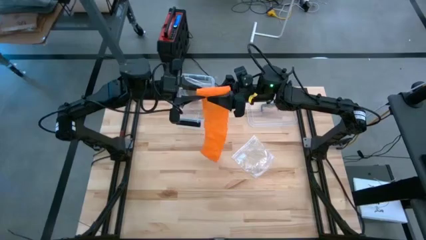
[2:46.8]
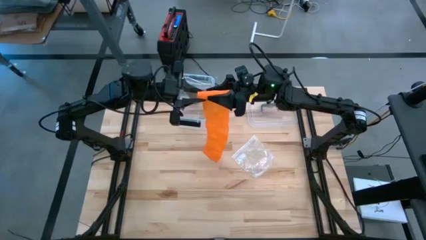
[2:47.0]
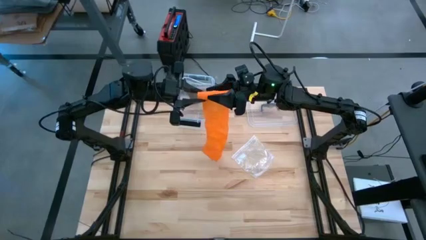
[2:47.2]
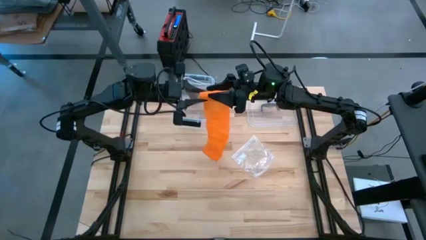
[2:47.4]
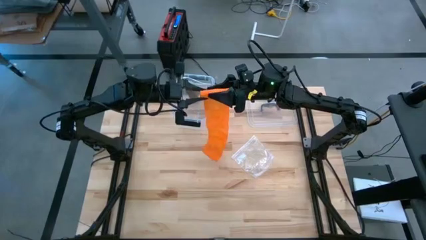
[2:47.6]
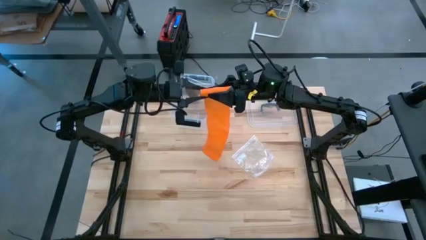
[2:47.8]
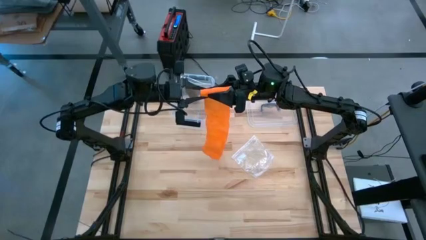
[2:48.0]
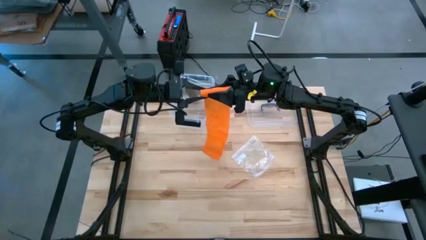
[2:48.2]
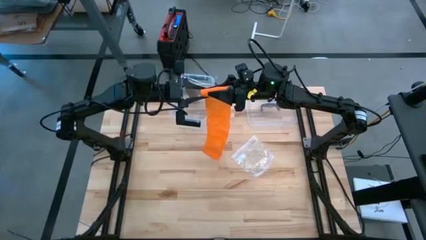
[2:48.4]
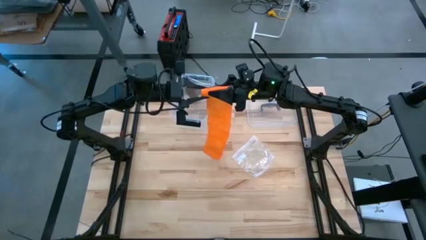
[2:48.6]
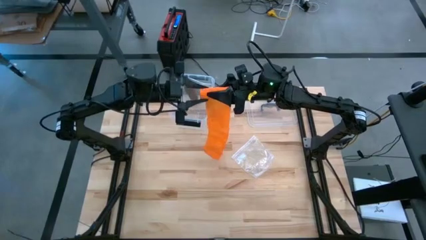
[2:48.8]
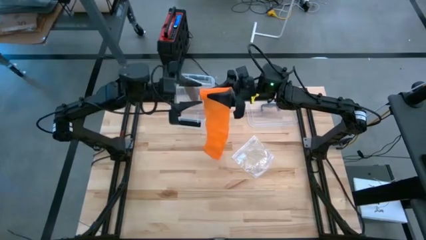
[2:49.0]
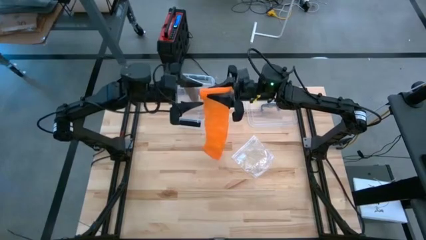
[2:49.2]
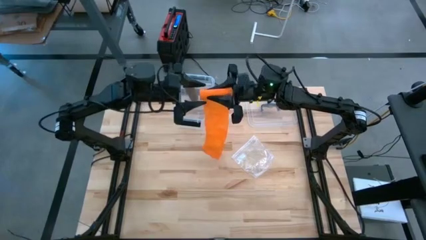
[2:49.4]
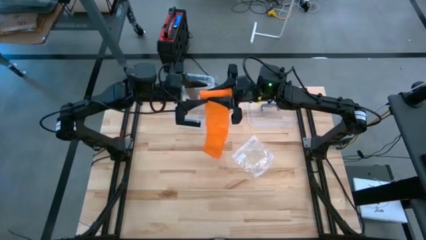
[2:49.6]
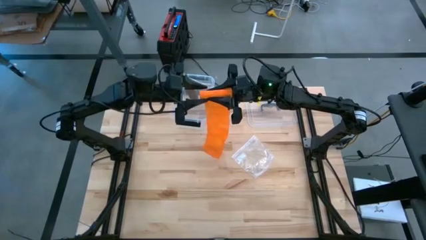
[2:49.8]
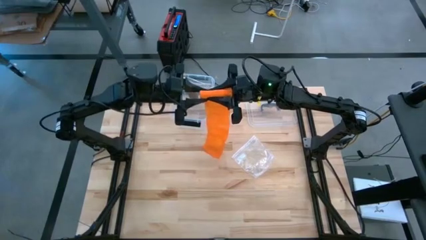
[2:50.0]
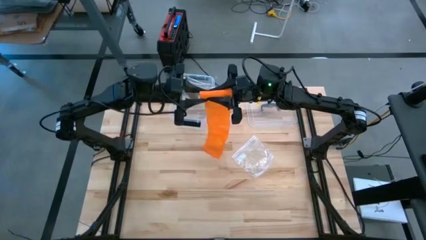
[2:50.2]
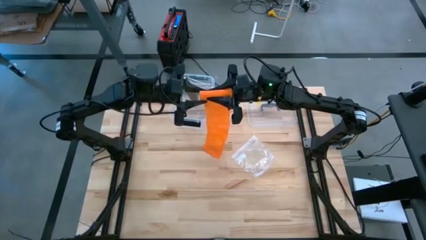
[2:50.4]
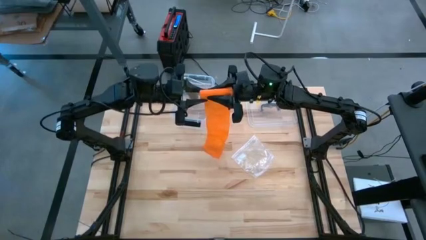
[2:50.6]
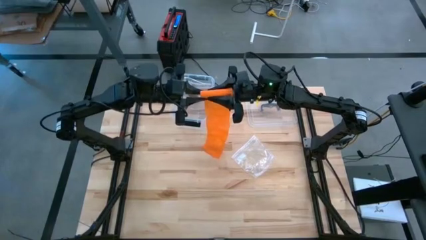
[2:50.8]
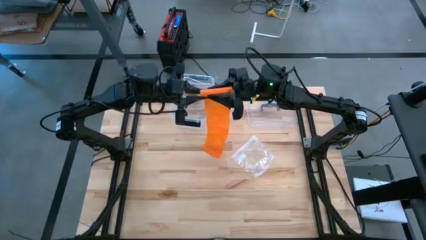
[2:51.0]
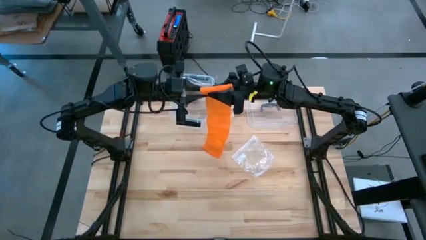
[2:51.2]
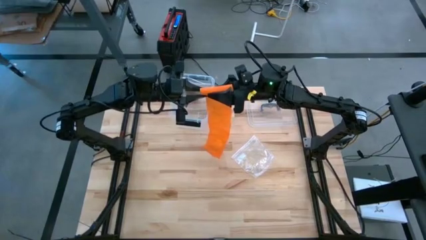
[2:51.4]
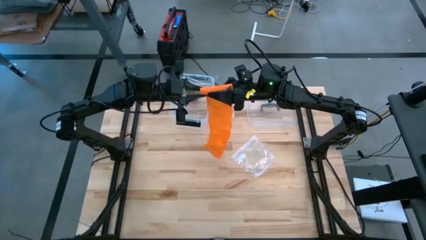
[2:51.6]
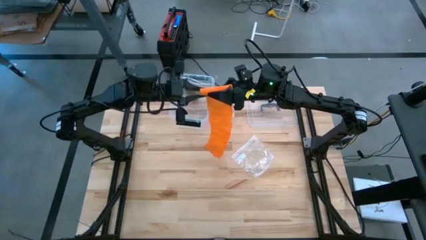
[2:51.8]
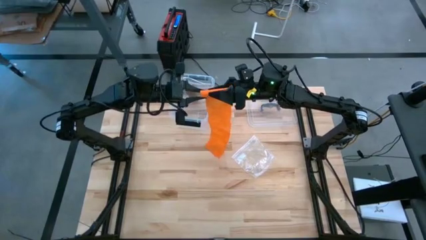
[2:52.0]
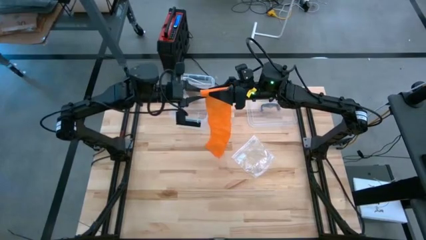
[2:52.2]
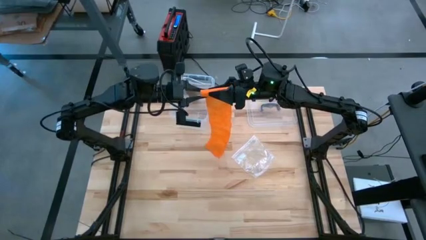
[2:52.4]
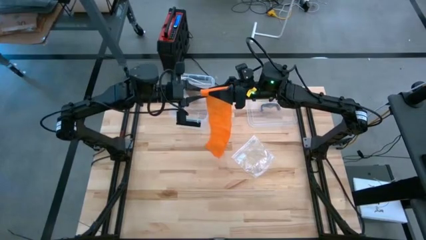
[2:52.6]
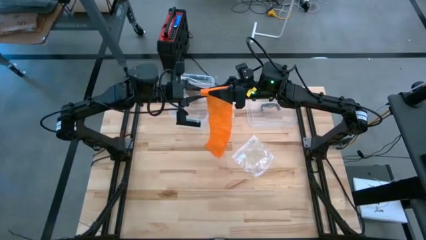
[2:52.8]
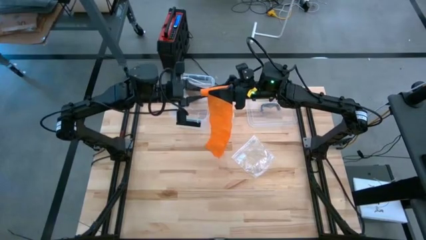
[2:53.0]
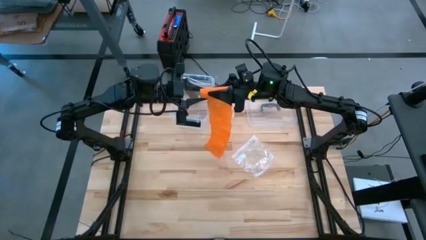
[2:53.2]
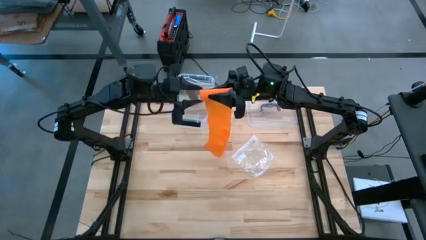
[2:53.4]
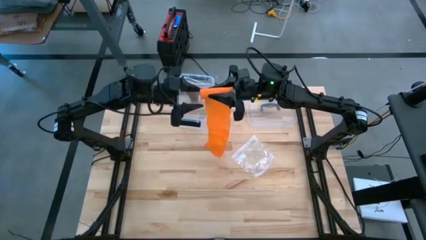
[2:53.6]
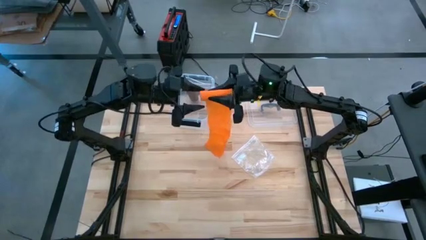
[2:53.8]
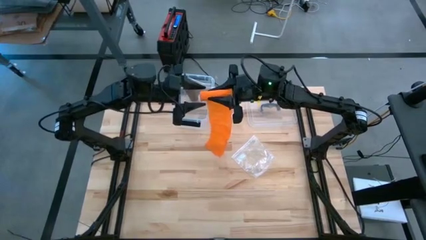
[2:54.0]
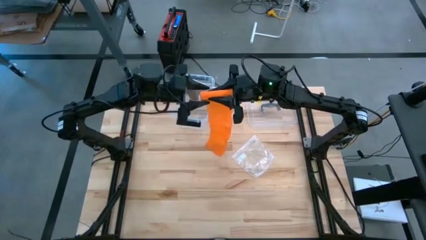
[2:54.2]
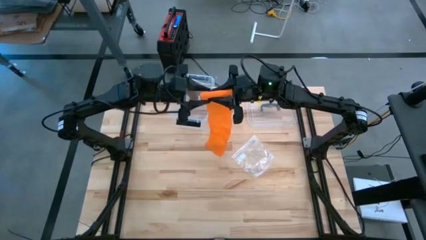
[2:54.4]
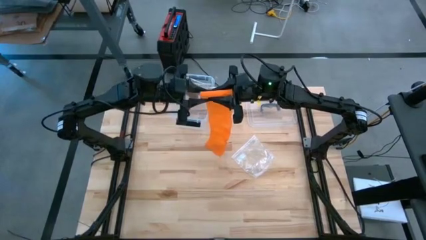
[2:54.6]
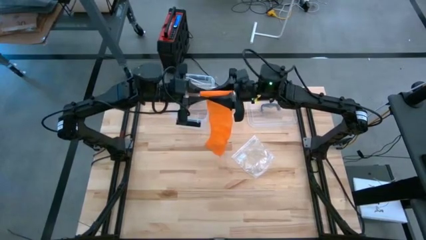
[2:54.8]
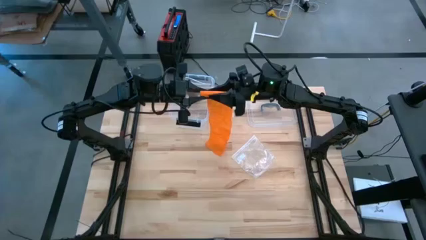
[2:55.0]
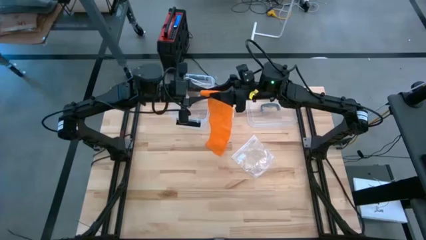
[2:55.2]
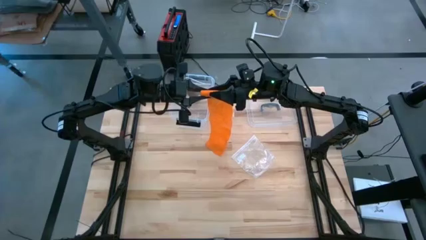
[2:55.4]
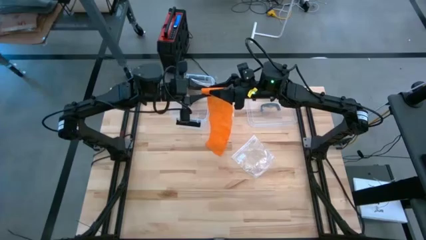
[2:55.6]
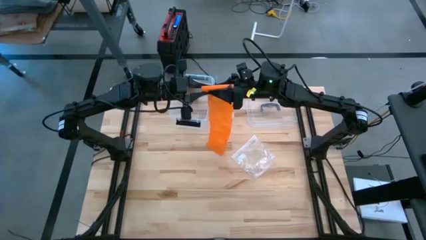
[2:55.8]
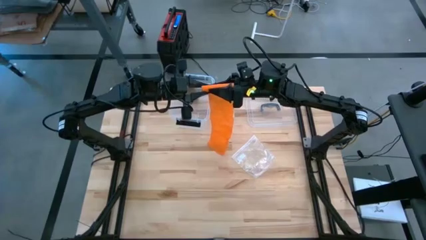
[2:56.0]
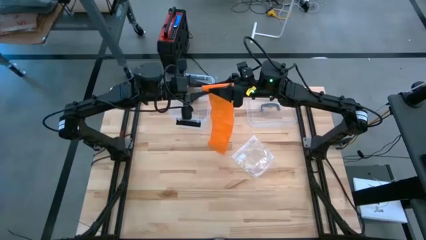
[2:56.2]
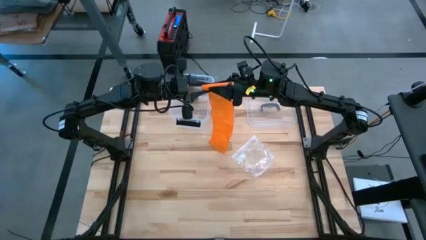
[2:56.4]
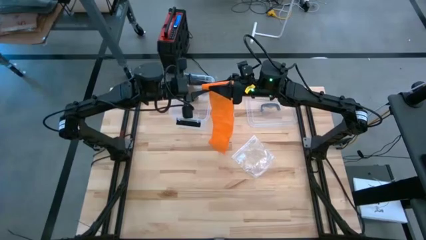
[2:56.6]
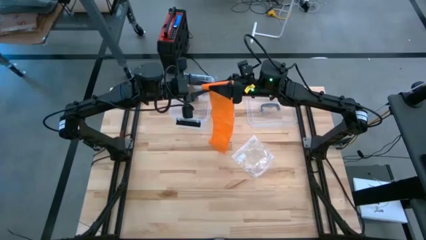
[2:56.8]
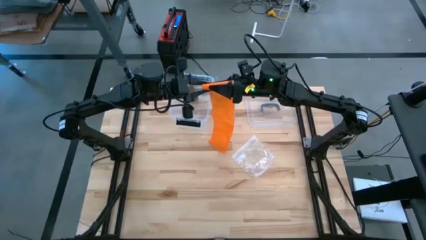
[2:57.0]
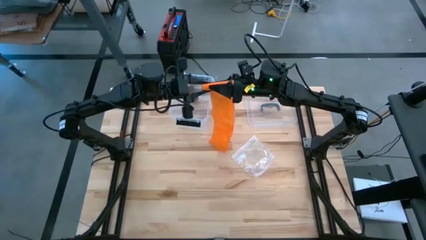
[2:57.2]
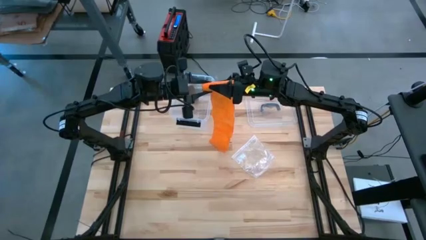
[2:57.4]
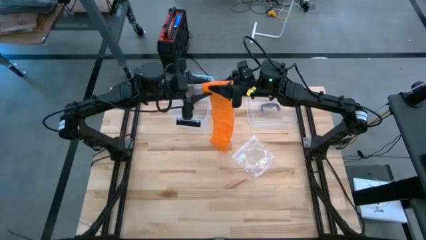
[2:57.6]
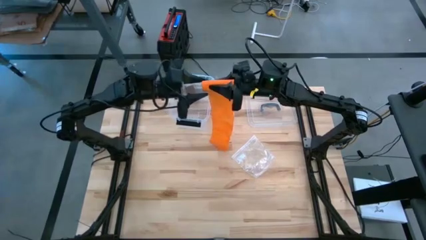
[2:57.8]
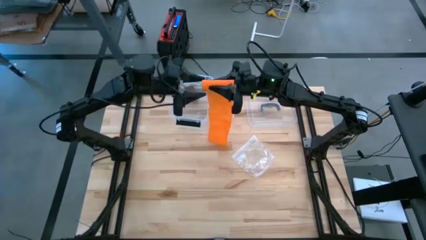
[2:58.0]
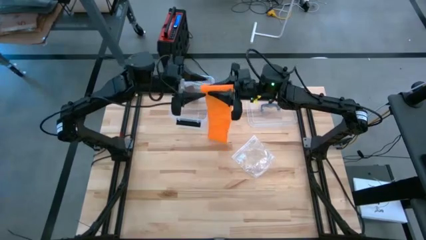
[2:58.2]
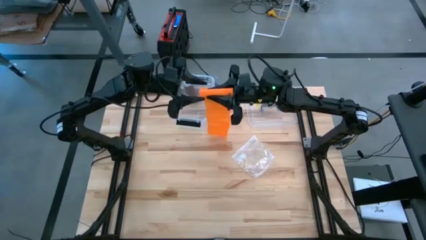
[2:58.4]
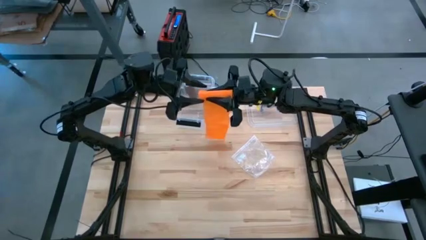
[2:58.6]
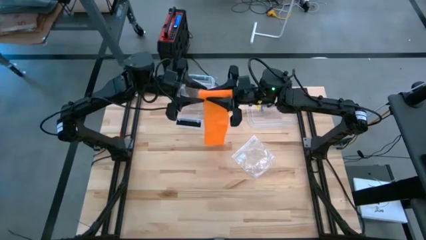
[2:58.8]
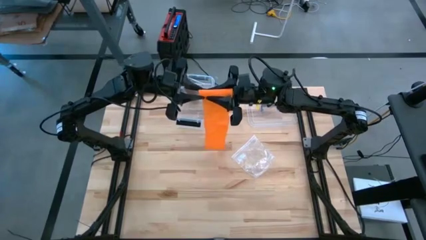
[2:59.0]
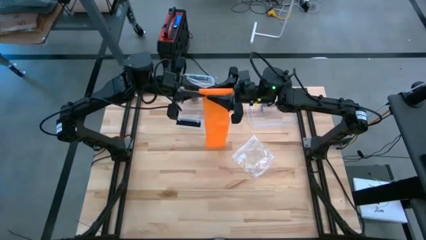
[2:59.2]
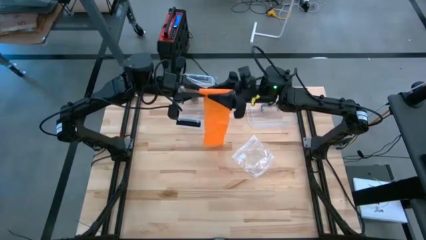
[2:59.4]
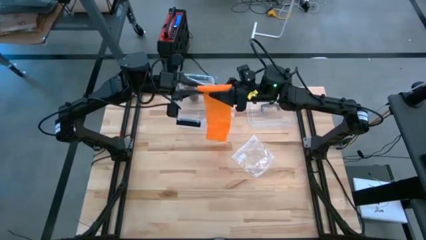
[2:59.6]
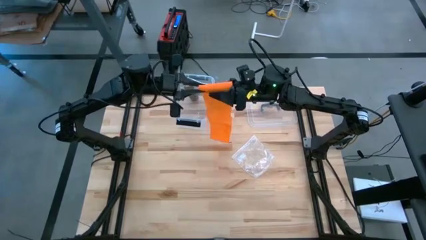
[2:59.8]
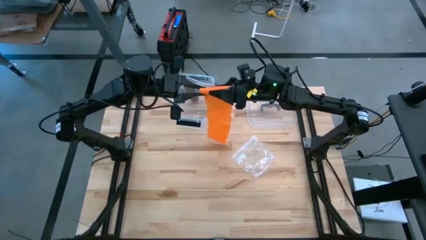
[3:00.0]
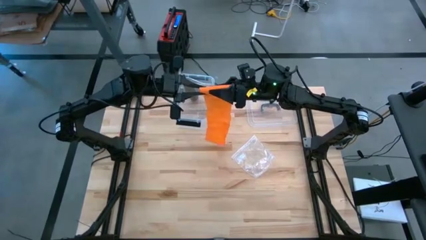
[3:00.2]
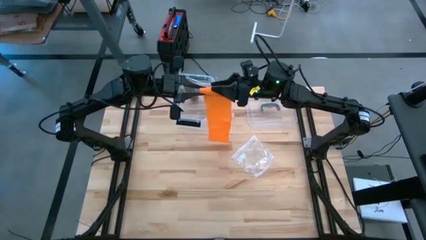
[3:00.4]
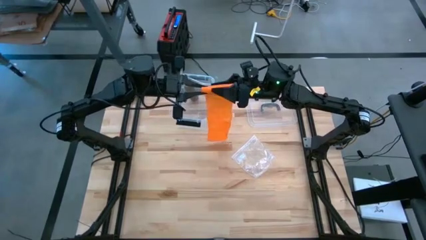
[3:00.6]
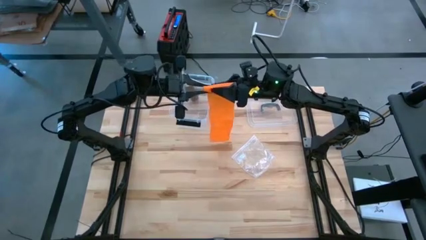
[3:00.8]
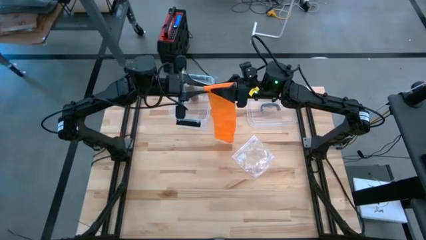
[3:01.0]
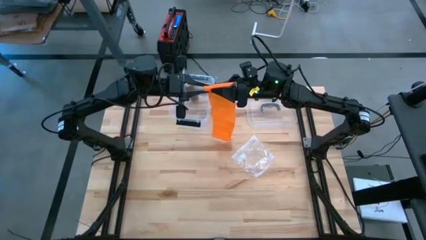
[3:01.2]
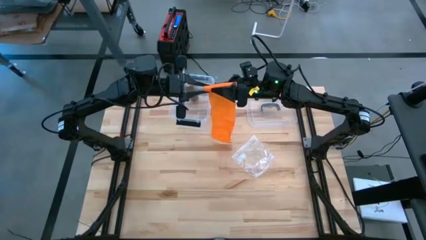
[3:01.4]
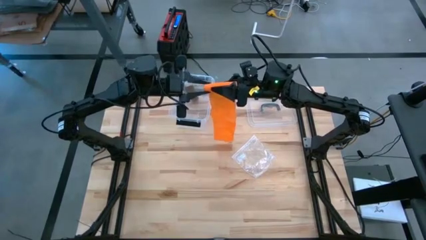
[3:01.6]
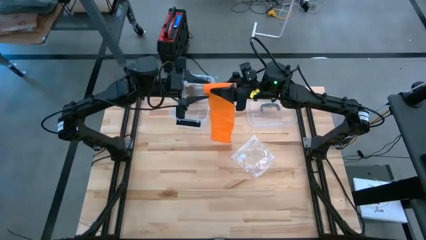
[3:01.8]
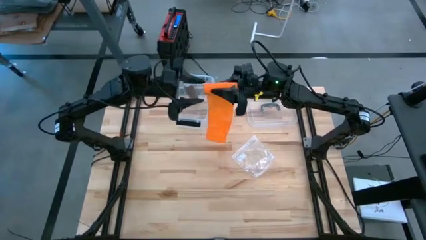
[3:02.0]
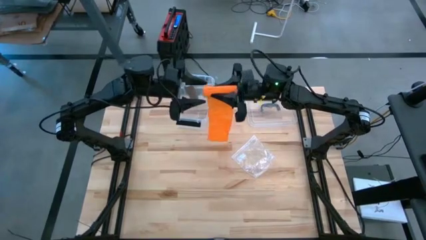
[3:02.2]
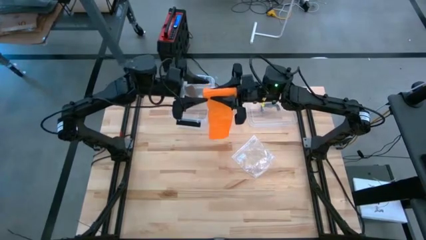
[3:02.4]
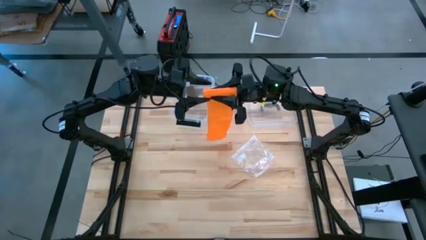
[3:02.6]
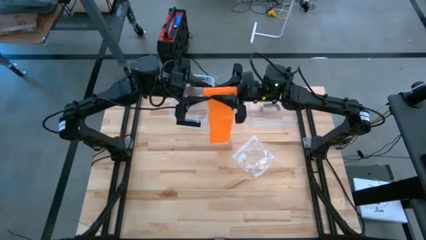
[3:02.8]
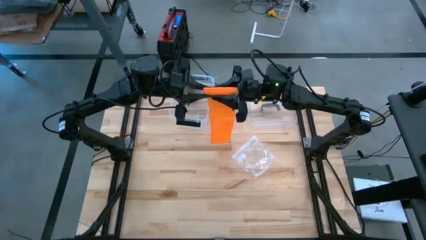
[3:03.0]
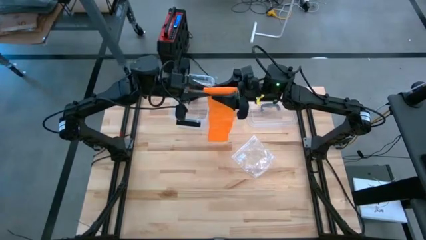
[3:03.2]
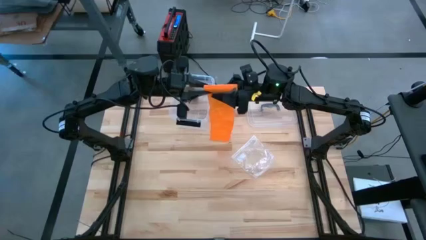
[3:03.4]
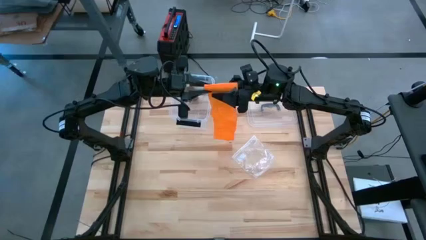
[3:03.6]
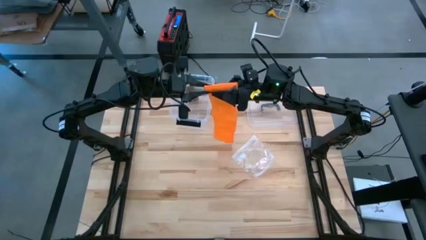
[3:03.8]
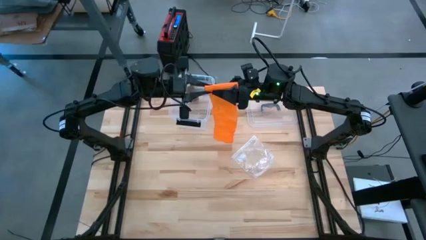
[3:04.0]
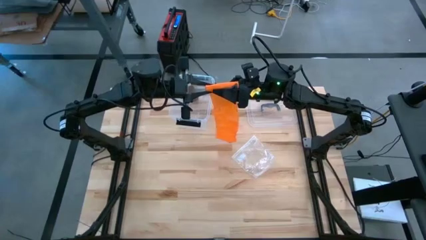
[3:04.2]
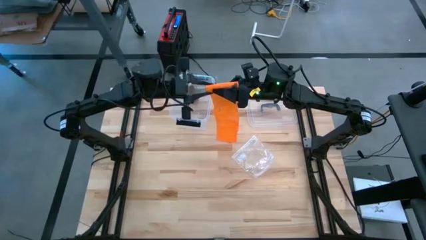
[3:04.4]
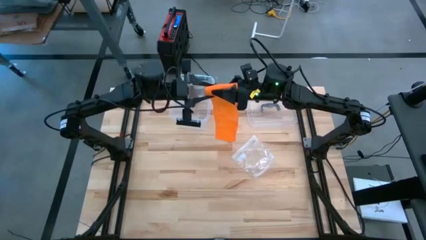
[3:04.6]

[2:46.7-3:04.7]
Task: Roll bandage
Roll the orange bandage
